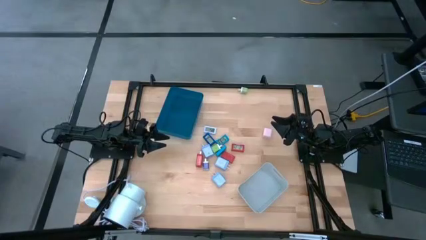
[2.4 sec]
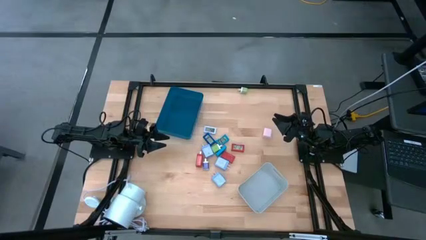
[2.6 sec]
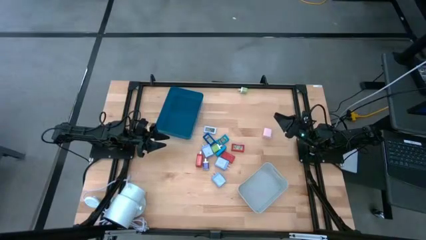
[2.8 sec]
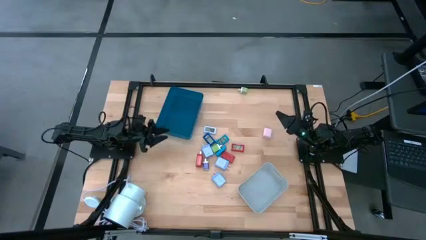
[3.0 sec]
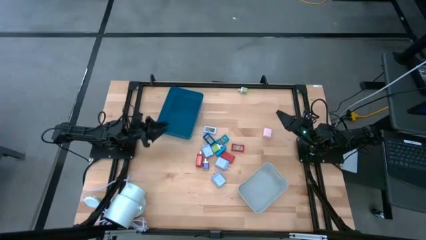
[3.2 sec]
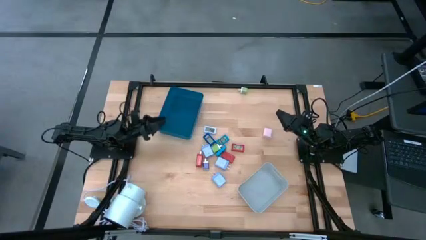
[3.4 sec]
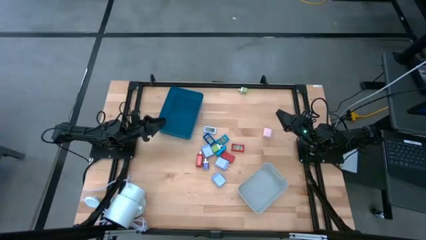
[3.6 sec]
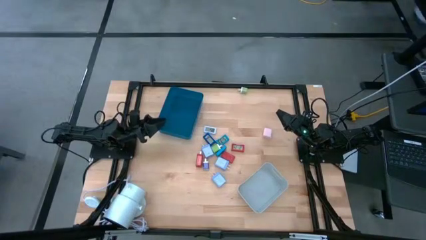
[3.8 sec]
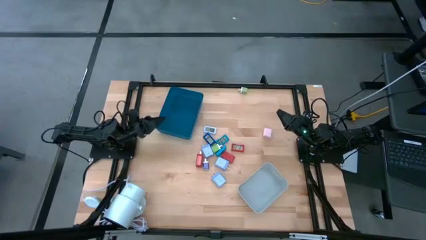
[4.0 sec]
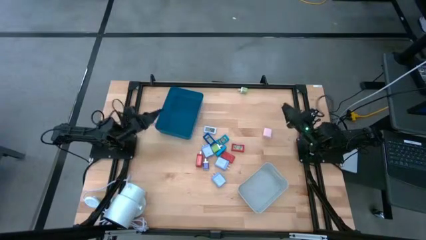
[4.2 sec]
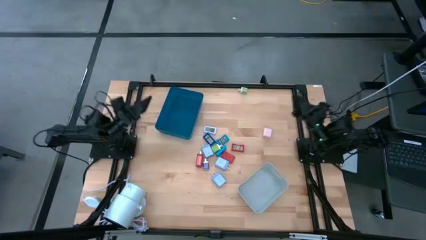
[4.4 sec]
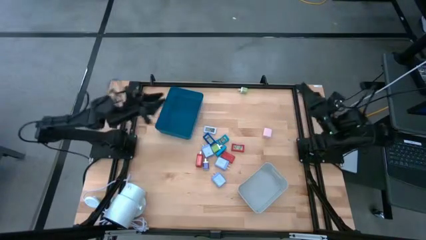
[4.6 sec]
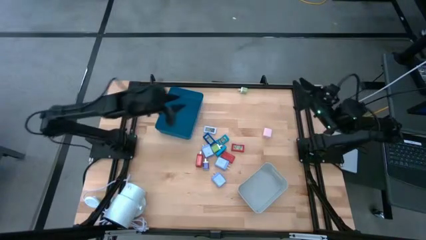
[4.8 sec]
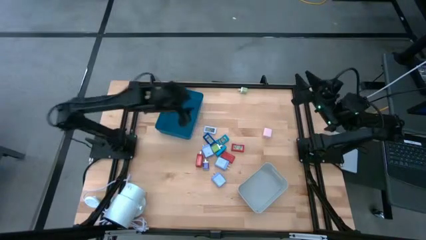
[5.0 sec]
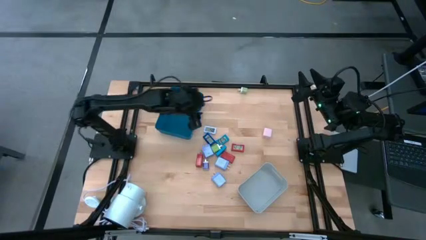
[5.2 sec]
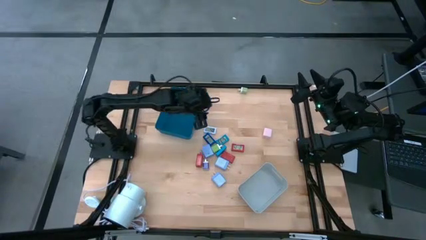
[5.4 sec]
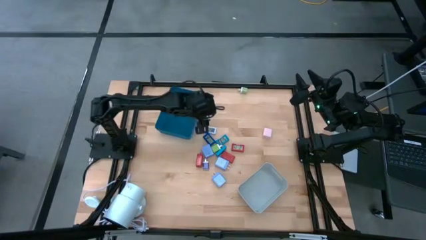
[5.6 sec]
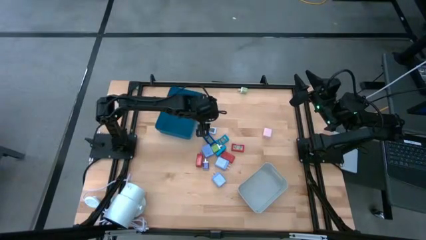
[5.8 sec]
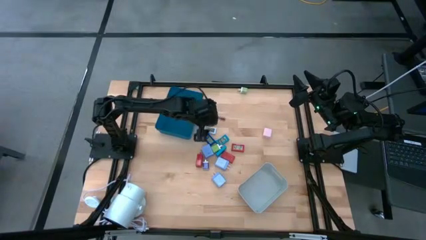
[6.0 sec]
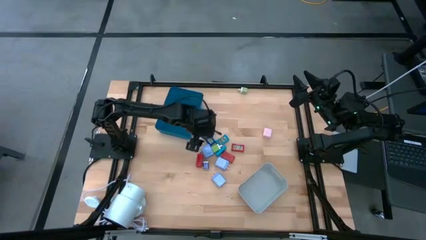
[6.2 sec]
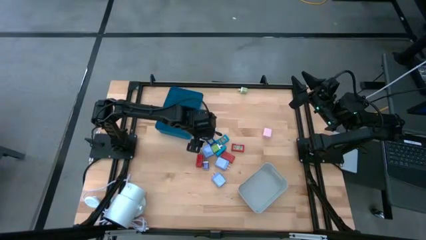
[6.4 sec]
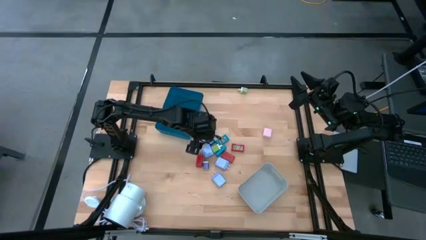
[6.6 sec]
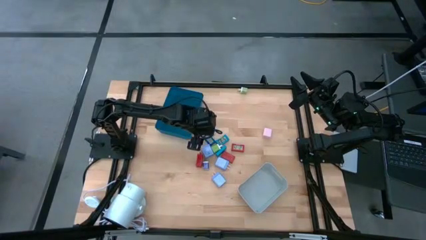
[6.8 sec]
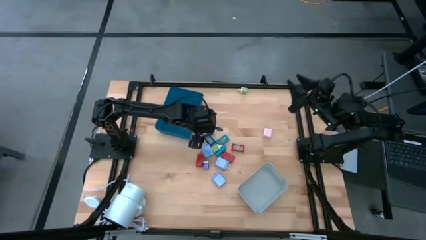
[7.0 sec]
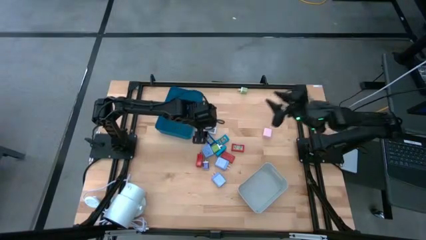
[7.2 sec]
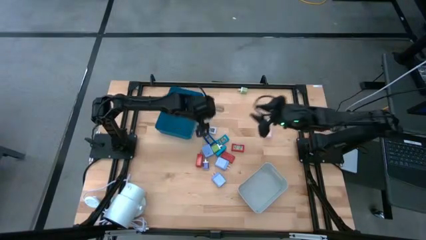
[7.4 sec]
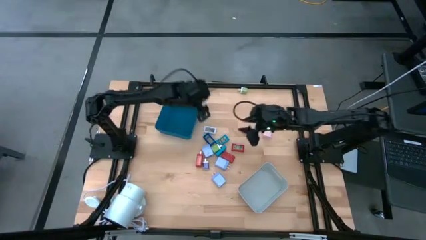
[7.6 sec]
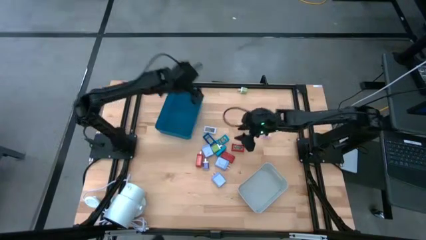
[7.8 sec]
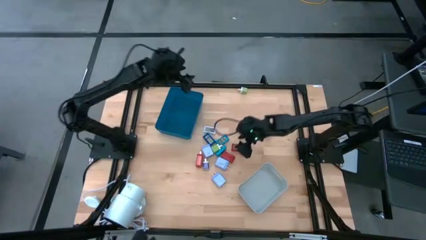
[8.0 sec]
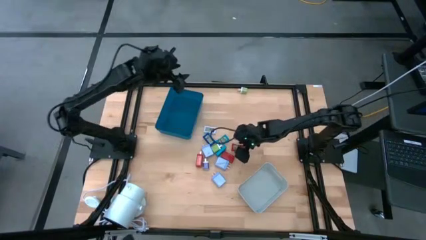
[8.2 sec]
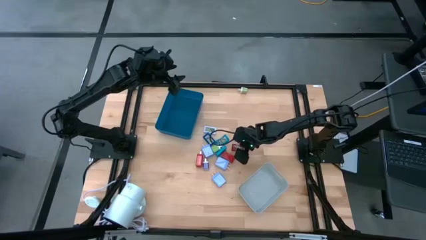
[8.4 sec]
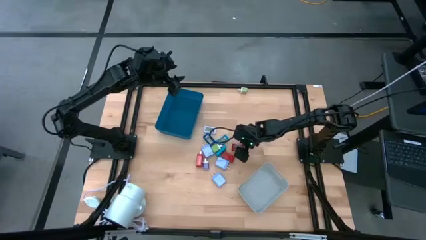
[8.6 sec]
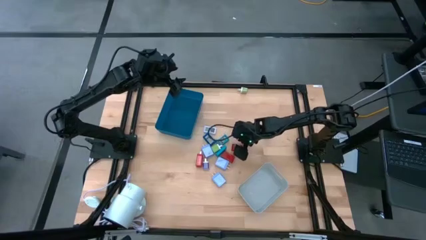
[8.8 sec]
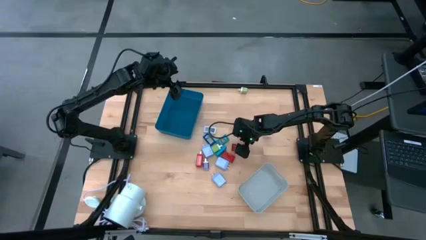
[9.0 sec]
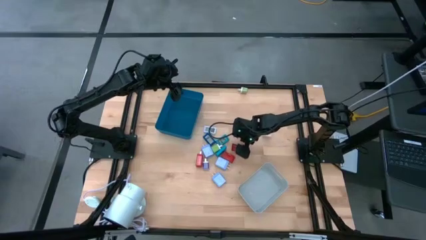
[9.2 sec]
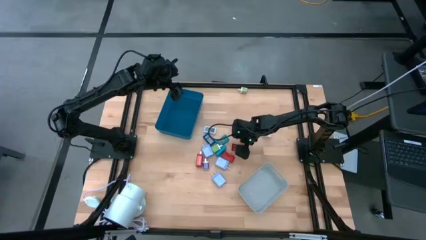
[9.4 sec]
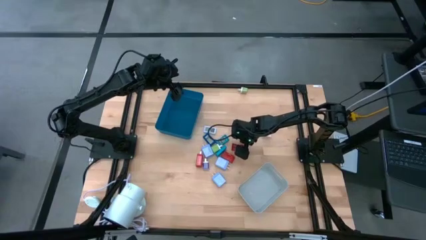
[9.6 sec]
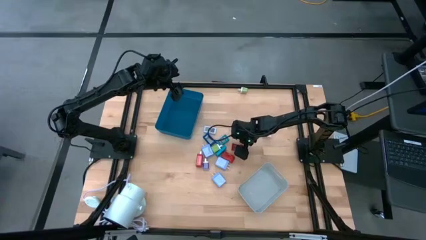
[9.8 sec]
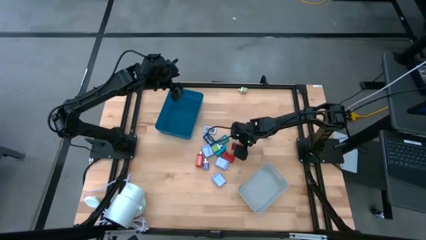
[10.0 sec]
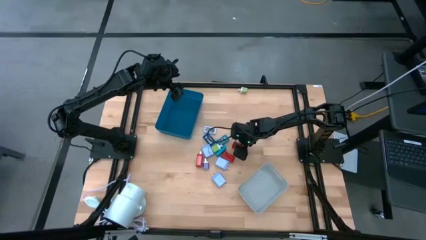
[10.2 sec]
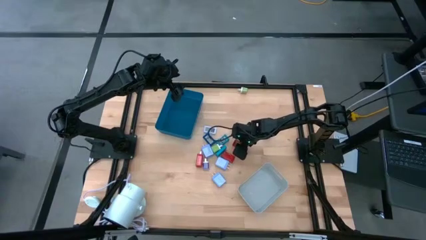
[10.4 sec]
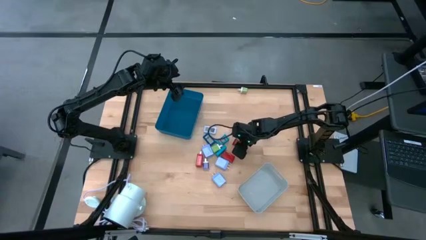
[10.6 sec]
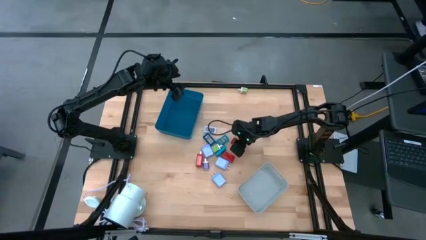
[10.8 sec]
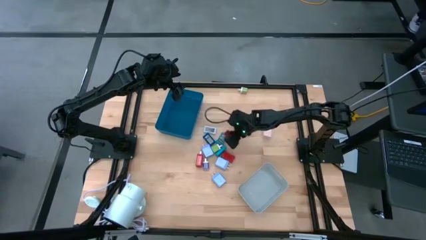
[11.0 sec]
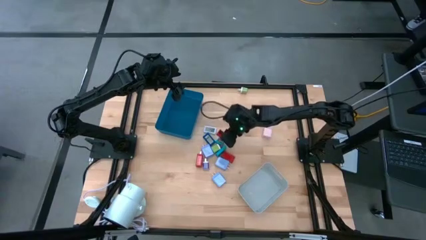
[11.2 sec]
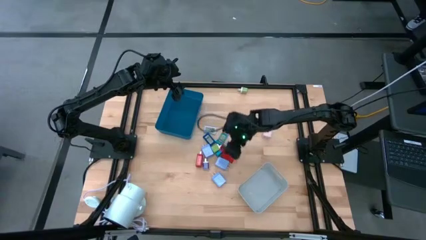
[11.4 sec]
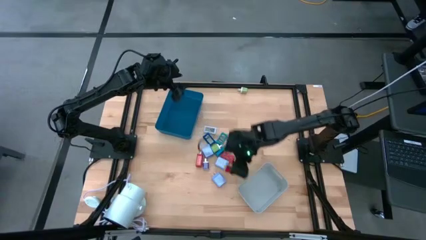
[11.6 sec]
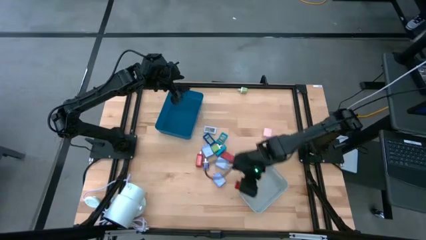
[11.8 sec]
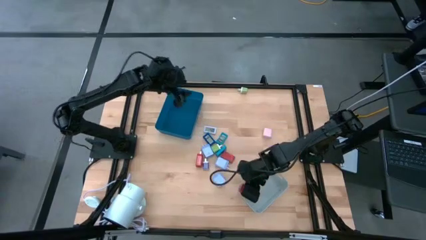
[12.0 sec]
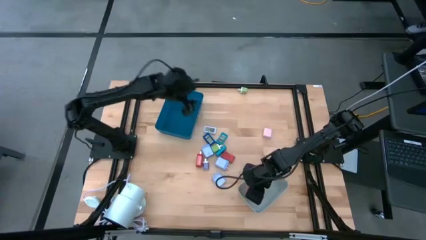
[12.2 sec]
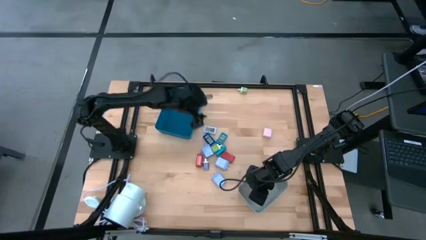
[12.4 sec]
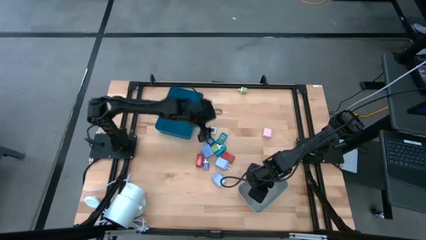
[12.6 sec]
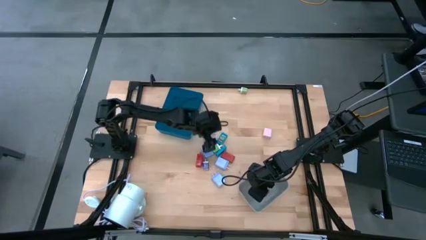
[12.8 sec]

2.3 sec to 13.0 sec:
Task: Pick & Place Office items
Put the top red digital clock into the gray bin

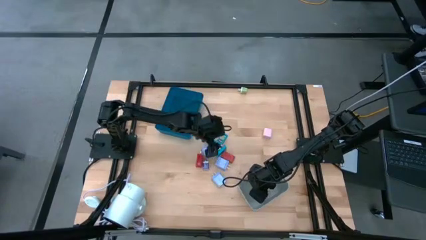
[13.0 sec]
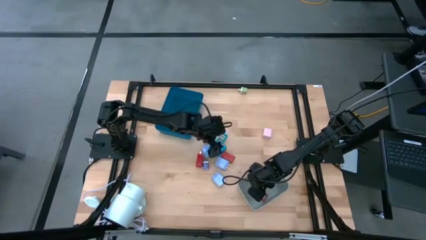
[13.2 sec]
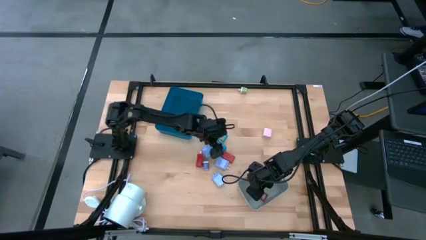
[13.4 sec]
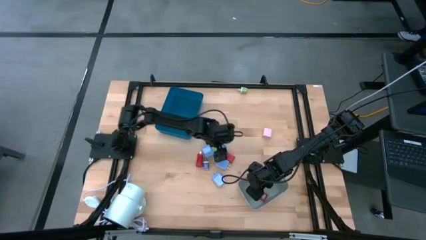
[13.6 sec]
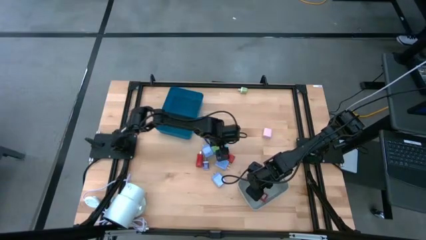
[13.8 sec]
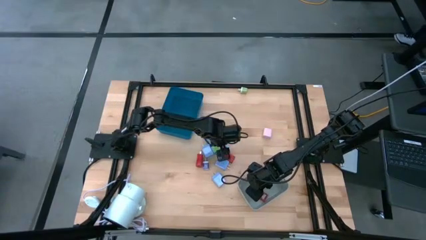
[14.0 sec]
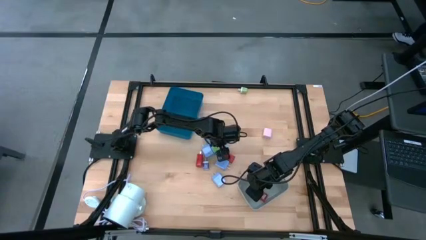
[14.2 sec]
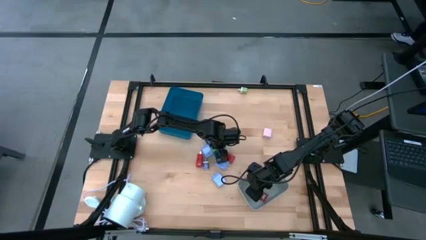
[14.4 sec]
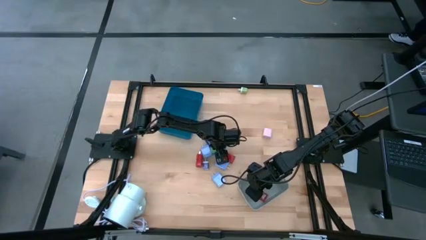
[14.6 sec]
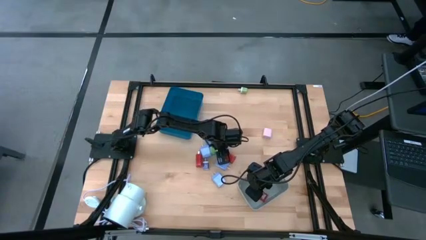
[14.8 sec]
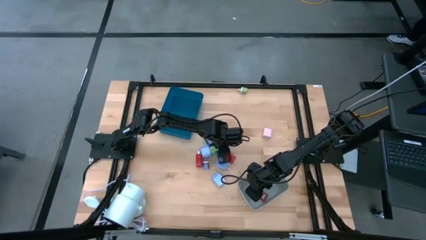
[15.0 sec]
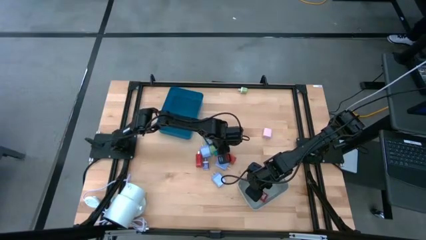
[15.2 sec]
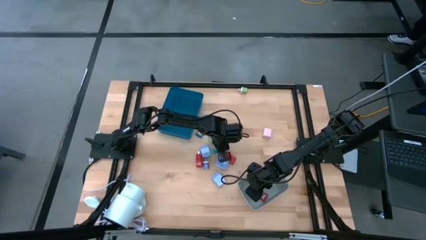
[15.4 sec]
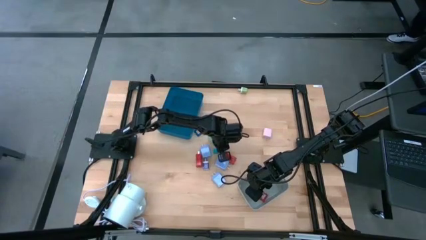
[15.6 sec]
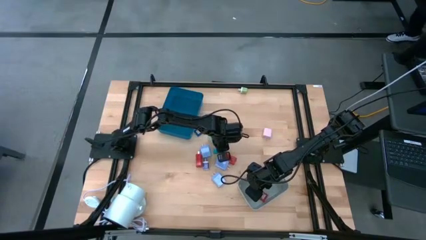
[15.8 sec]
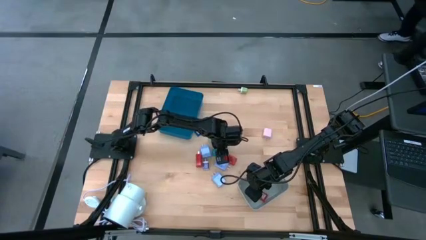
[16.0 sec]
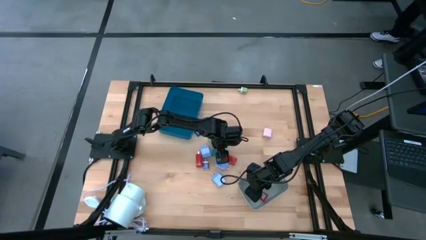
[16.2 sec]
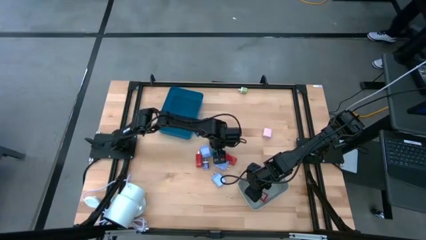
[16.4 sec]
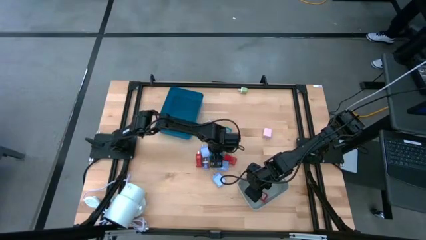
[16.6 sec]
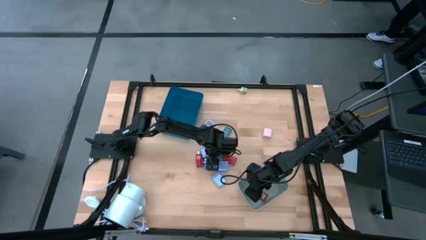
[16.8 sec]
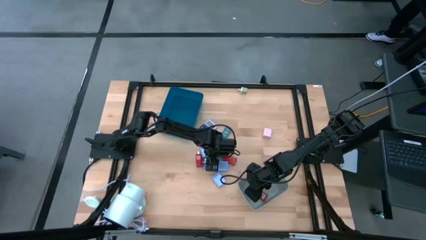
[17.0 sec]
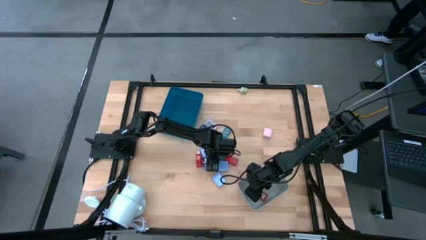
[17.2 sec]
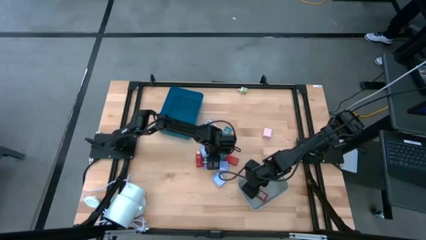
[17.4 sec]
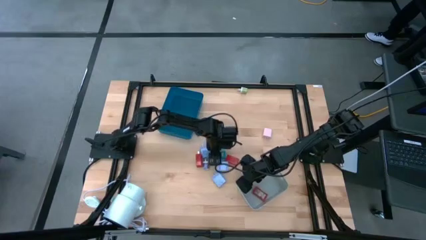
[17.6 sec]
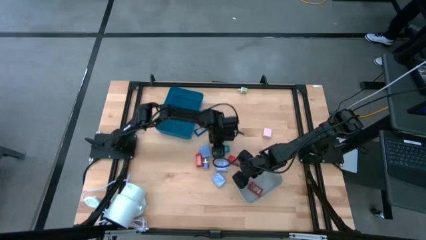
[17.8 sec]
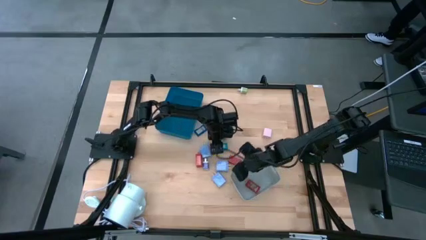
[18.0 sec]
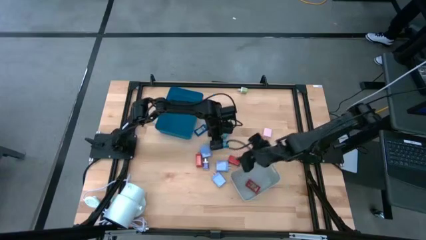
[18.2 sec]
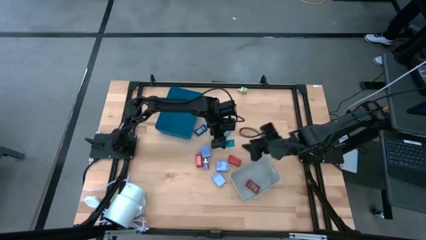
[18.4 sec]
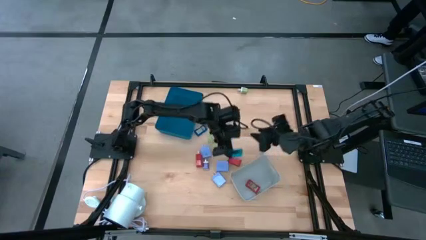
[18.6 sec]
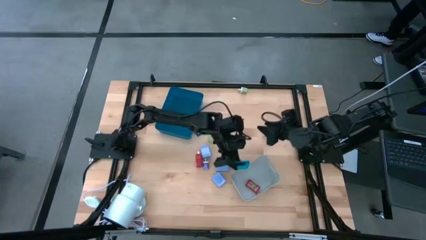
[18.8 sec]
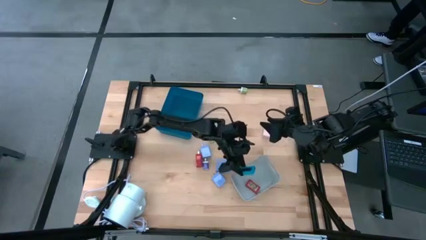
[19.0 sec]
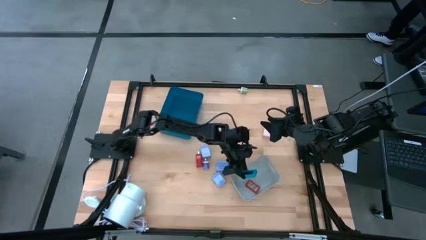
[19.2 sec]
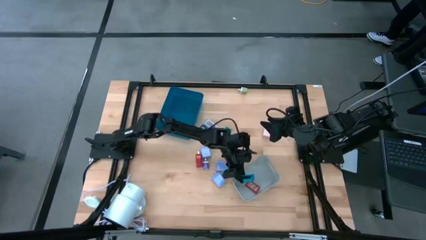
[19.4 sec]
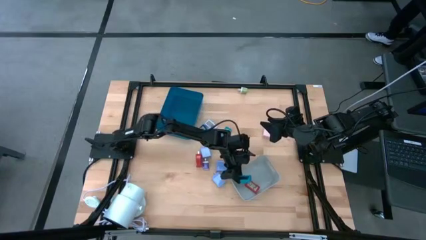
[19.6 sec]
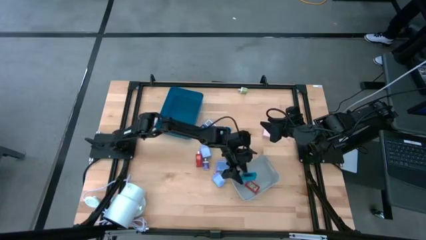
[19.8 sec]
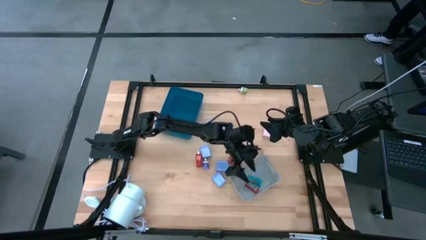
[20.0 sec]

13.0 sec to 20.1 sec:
Put the bottom light blue digital clock into the gray bin
